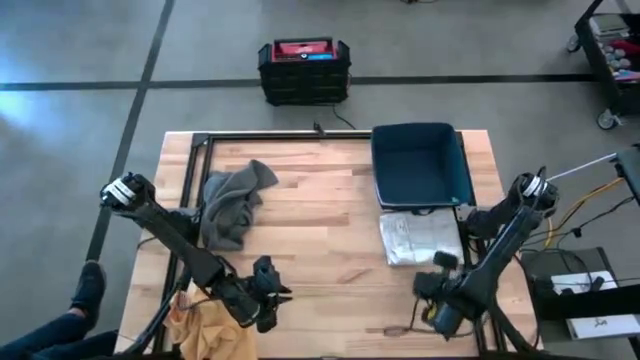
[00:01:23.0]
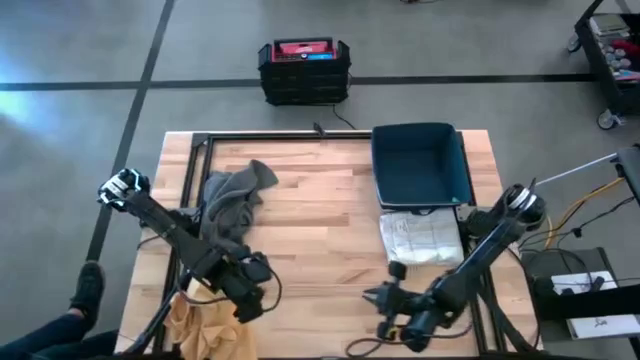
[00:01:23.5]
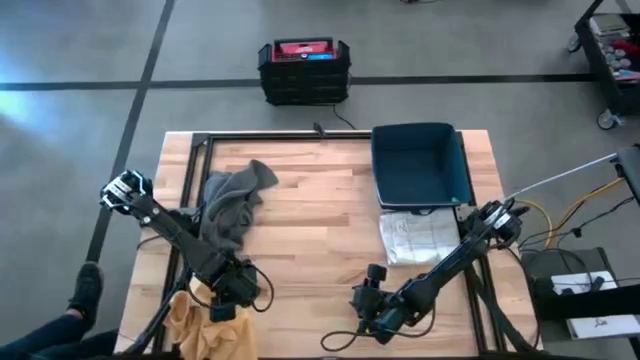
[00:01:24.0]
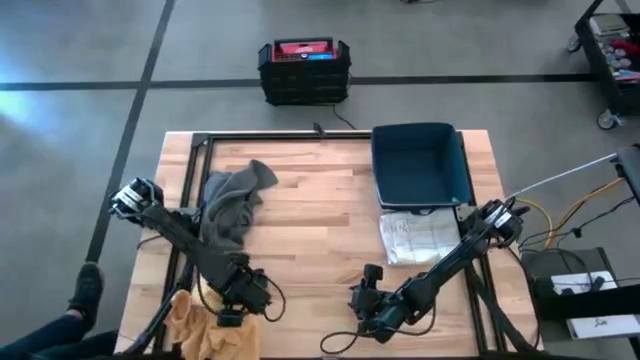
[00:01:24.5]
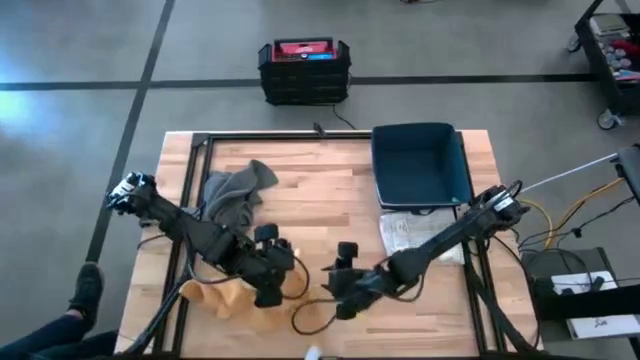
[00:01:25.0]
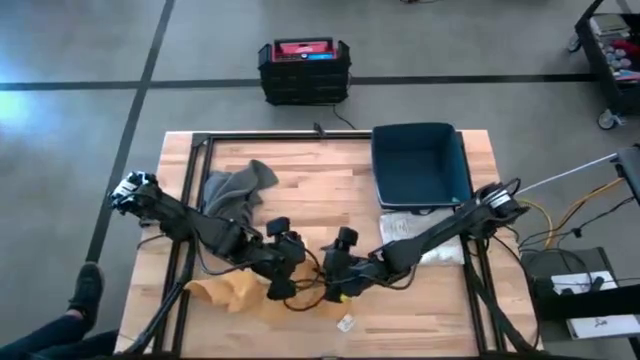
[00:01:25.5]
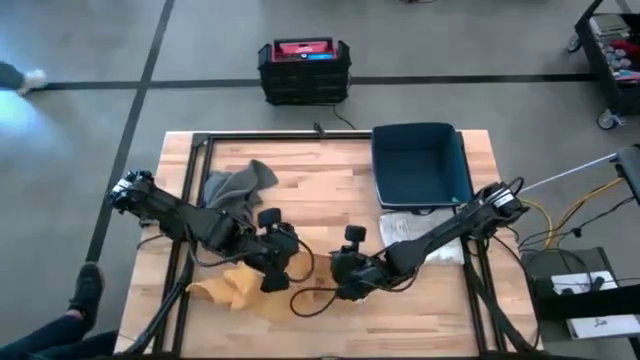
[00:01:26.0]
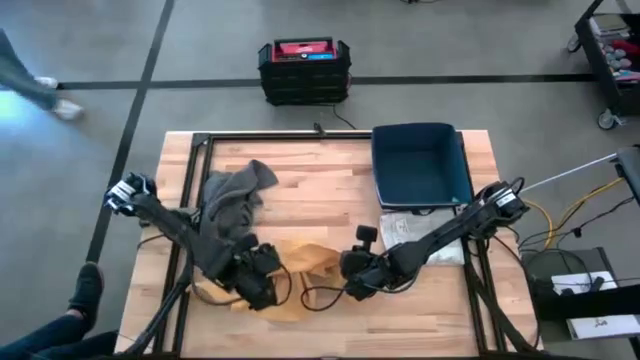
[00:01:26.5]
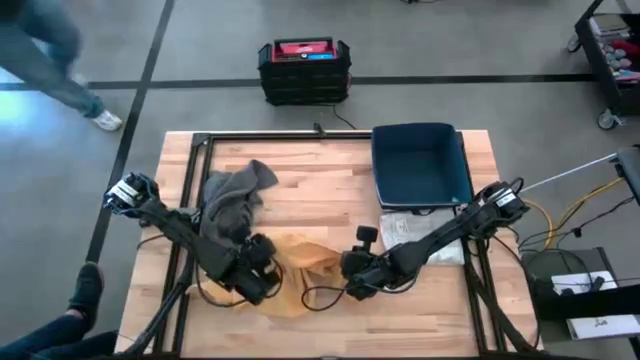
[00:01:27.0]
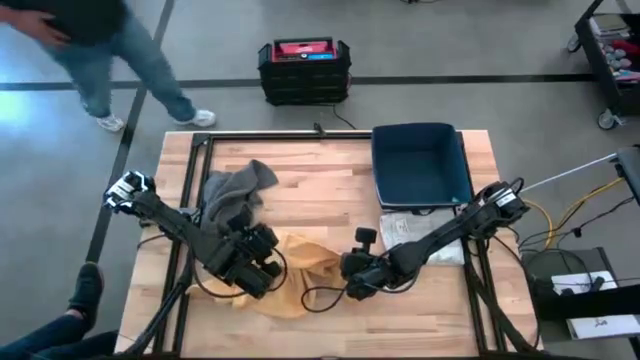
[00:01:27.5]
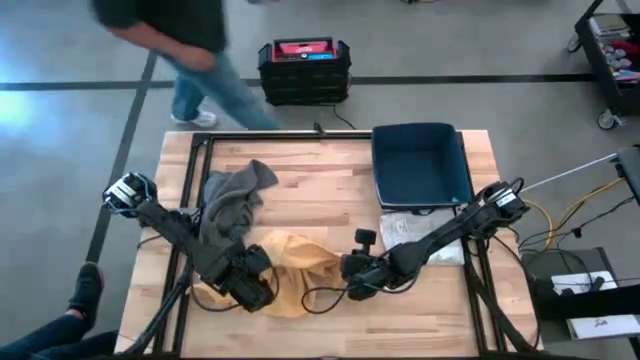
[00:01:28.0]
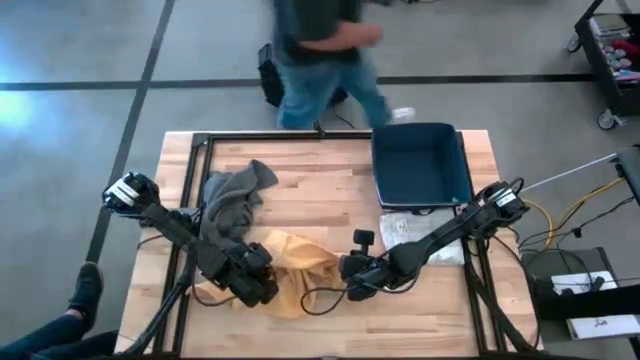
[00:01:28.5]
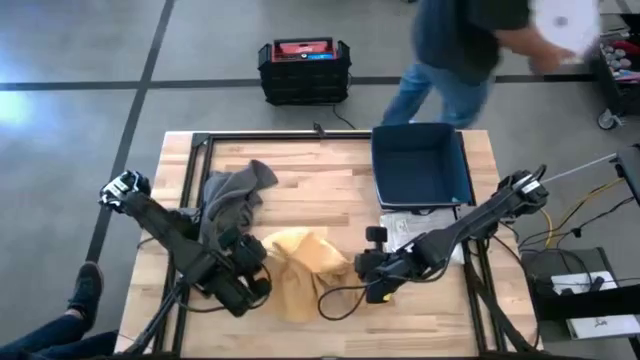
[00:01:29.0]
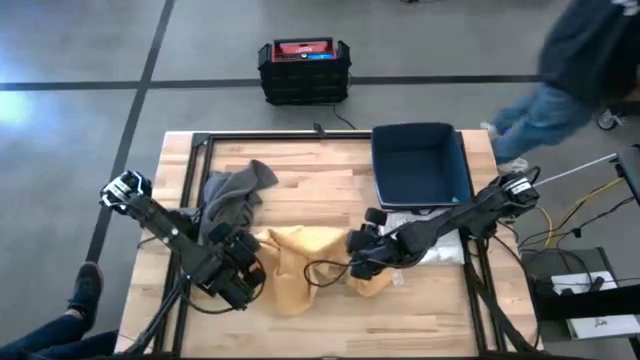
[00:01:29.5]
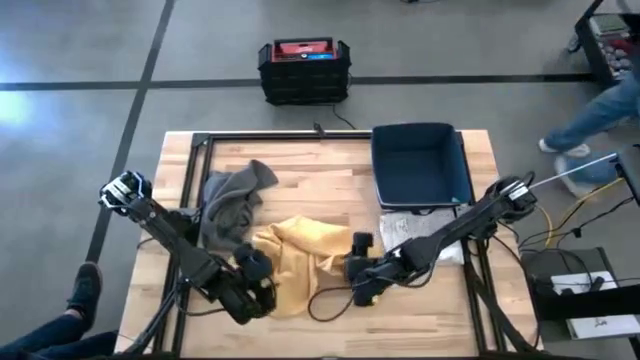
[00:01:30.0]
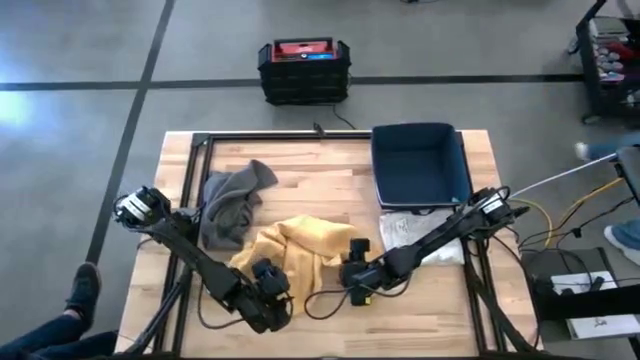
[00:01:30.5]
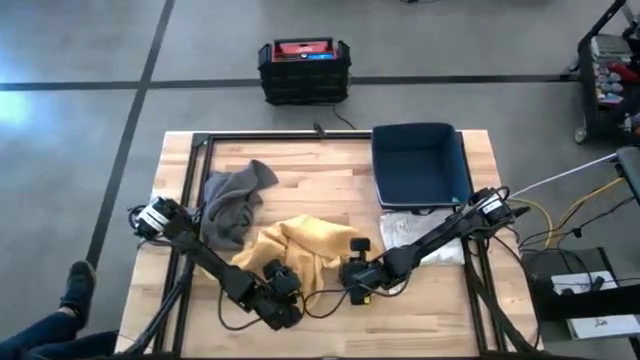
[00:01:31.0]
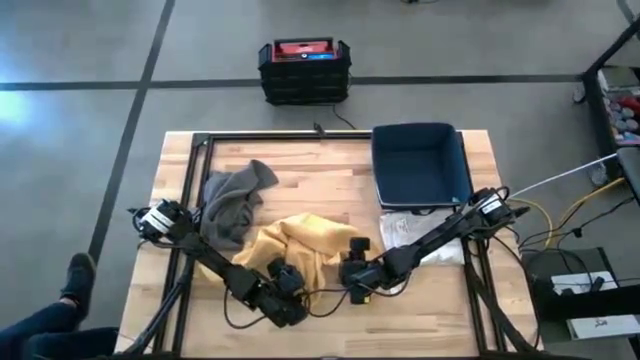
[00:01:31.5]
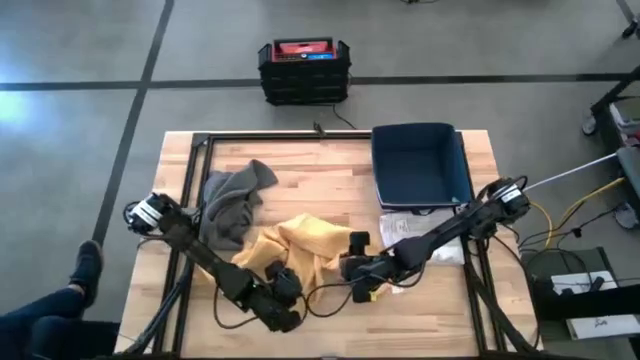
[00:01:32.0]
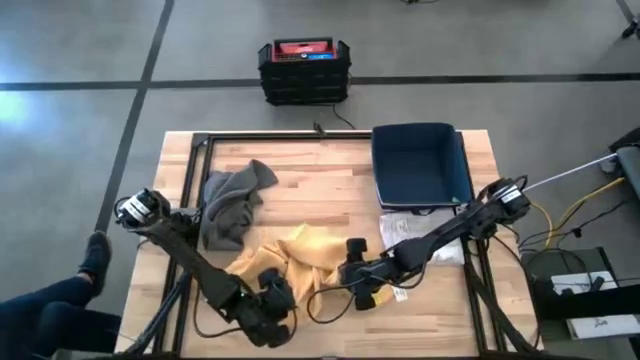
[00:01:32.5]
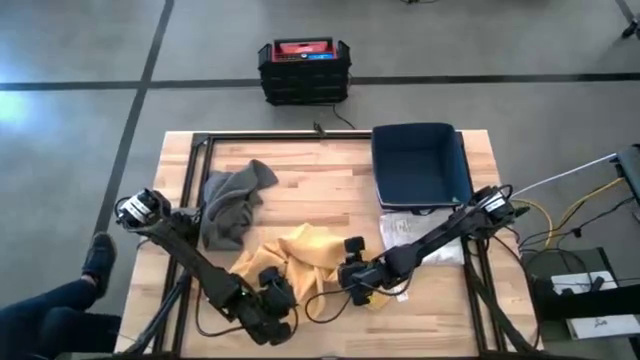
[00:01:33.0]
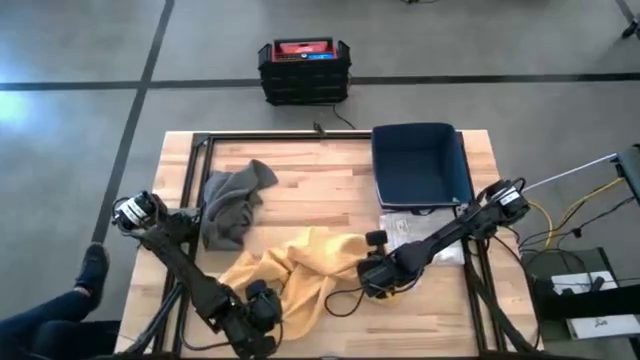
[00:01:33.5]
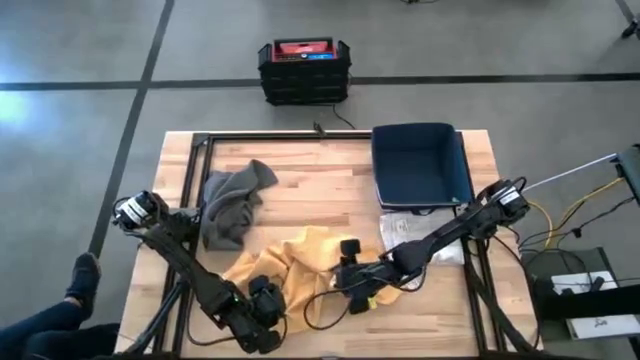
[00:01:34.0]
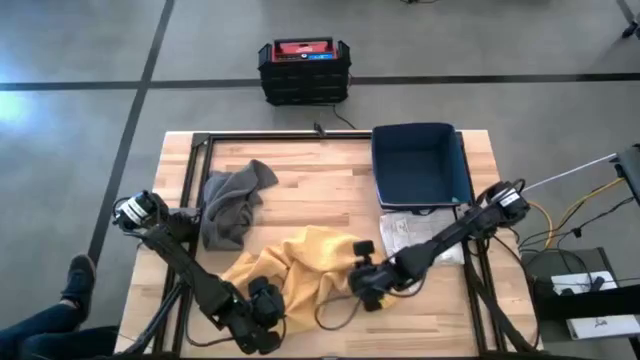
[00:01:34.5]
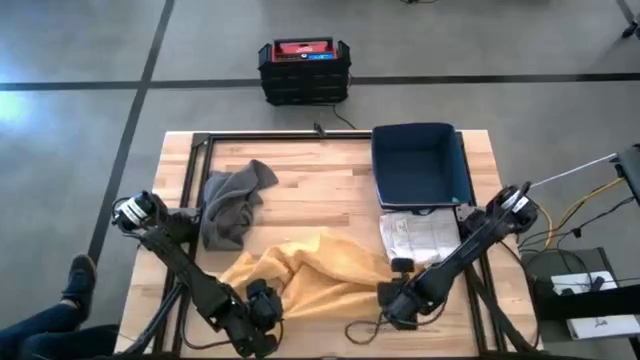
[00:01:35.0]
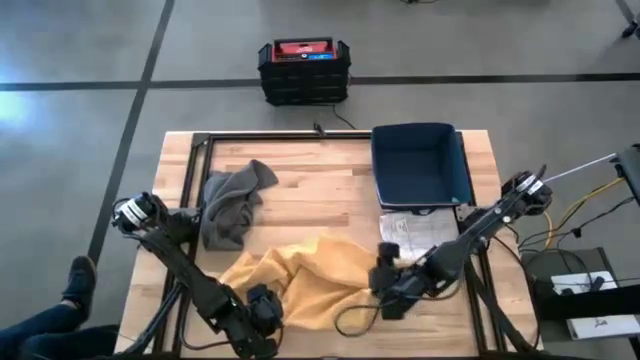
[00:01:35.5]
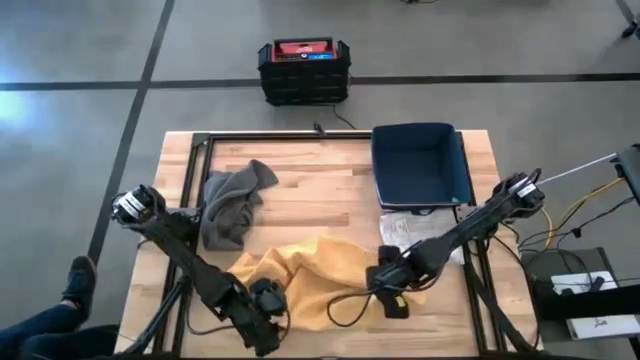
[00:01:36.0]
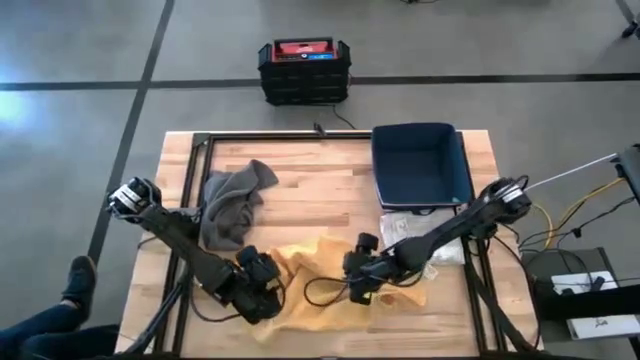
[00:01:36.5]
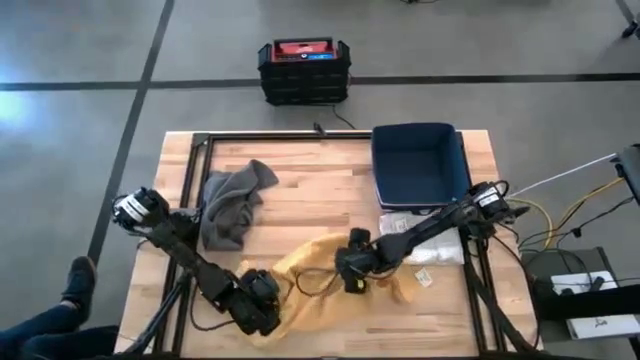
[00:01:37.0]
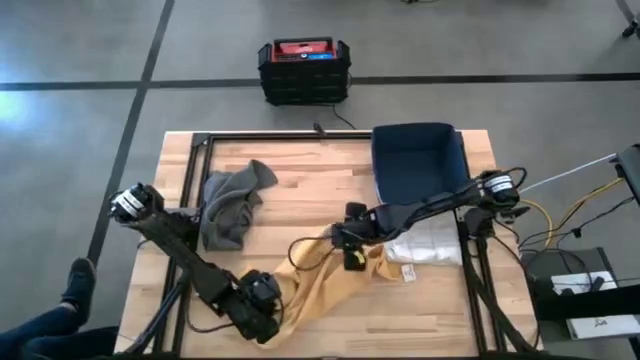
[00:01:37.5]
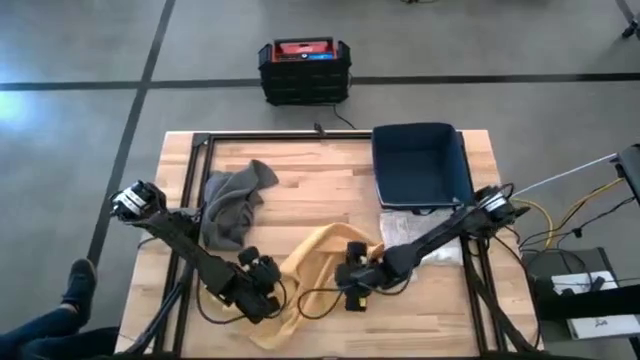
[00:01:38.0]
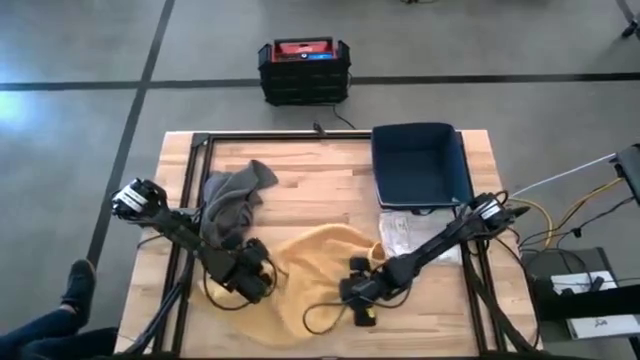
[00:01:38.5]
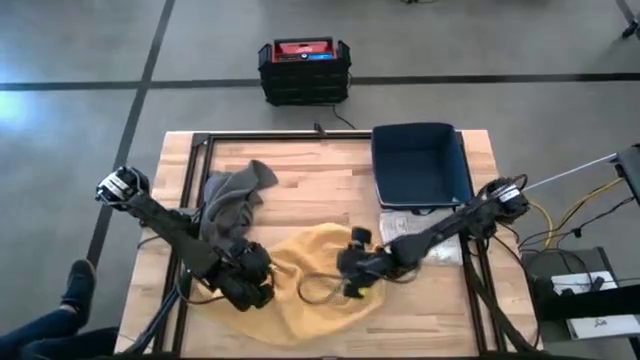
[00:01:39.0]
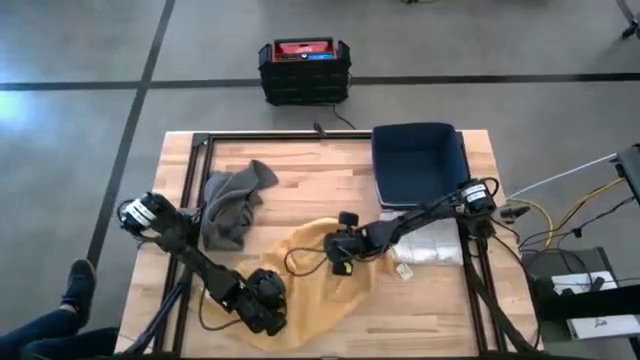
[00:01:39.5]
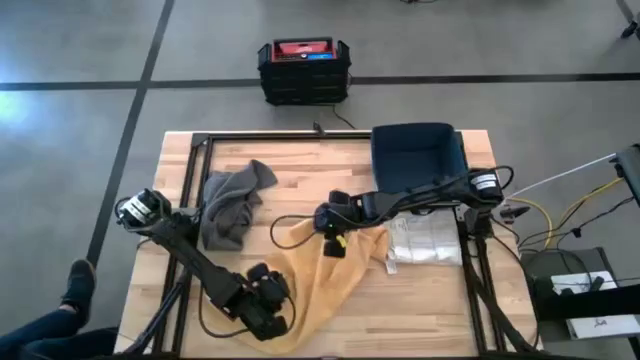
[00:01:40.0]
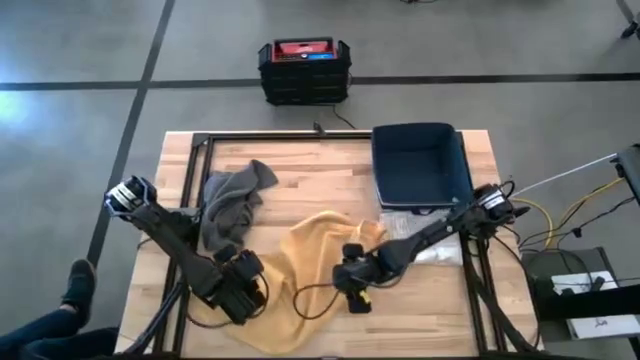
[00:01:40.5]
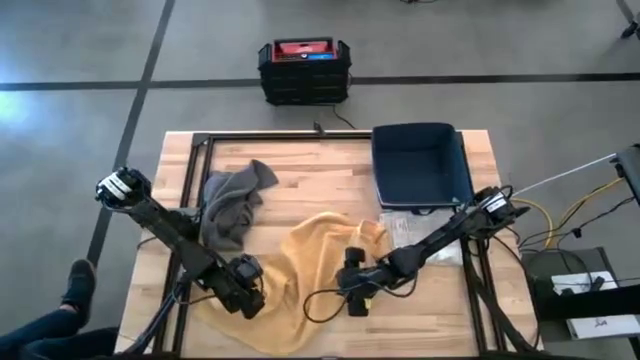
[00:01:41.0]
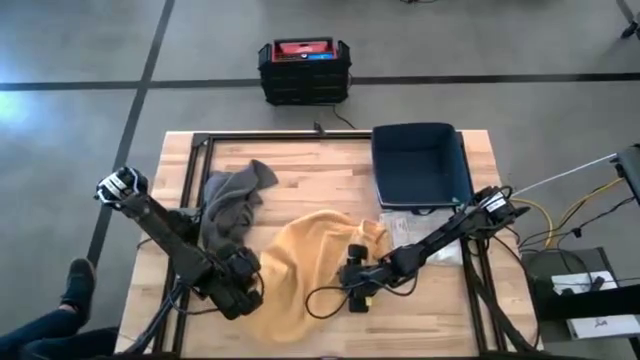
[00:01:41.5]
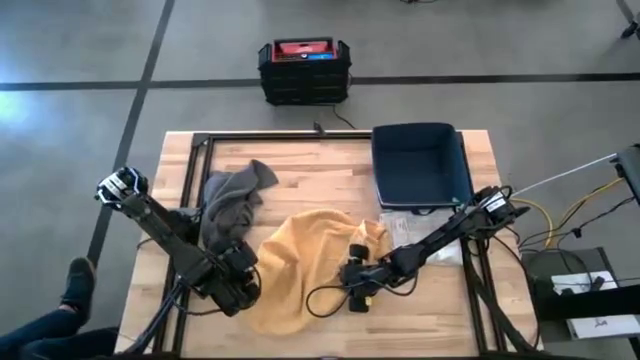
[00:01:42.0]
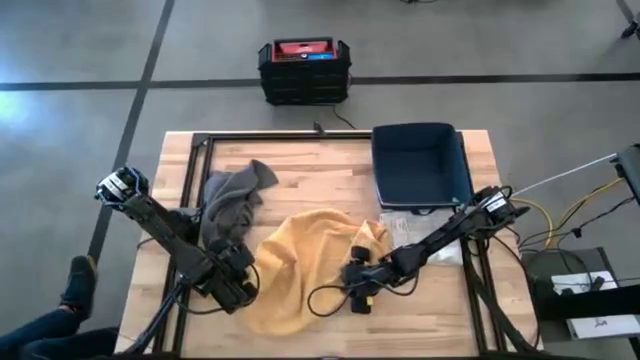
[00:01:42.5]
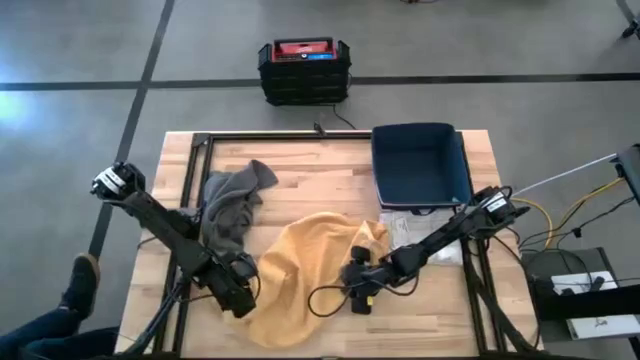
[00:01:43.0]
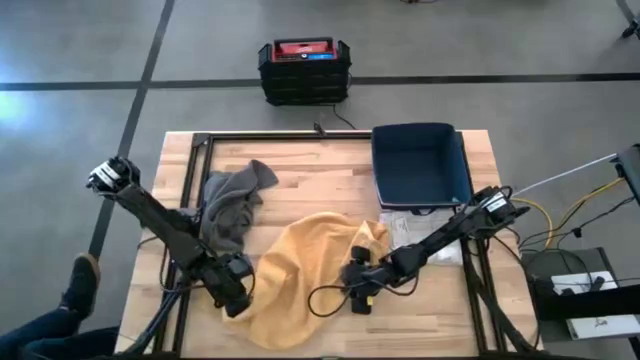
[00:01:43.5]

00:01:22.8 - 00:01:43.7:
Task: Fold towel
Fold the yellow towel

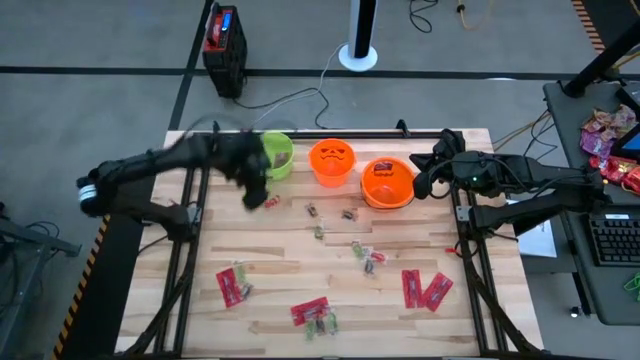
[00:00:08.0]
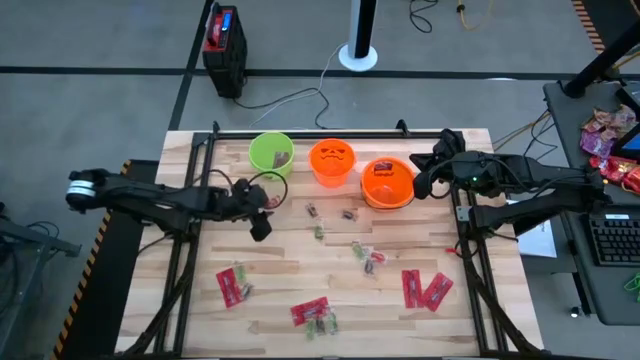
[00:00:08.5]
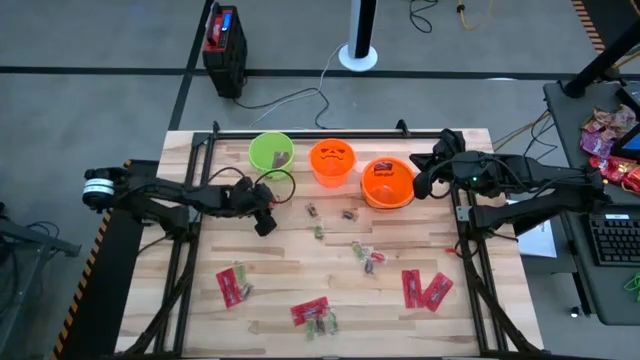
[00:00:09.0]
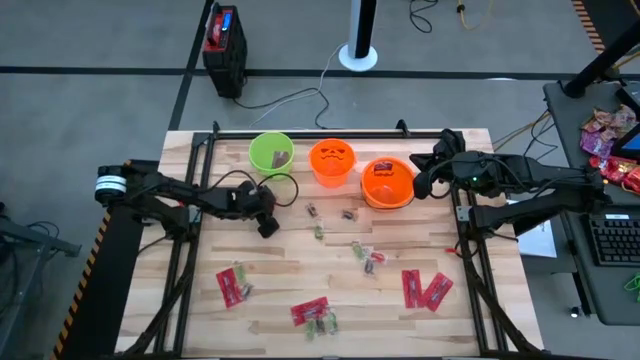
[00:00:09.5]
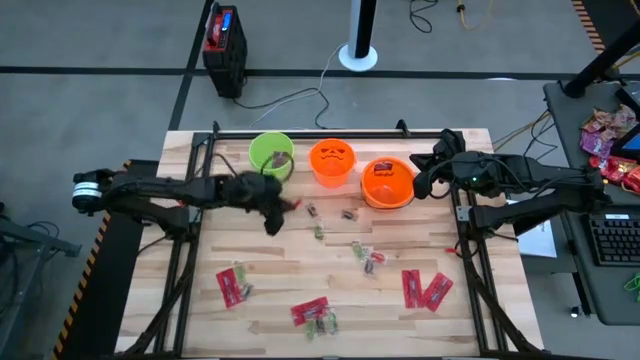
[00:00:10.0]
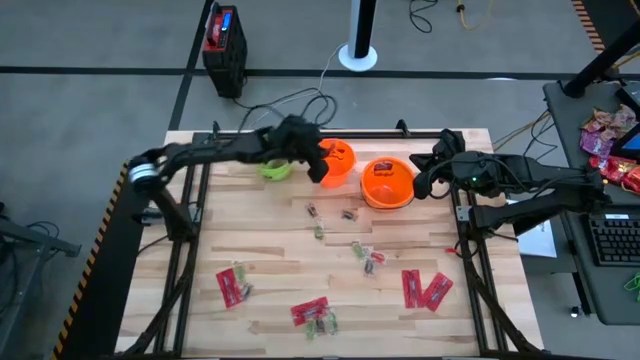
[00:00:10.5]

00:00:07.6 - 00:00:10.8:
Task: Sort candy by brand, put in halloween buckets
Put the orange gummy into the left orange bucket
